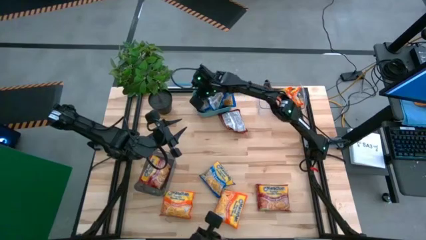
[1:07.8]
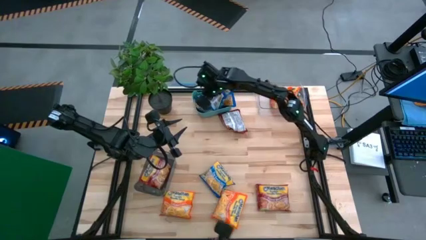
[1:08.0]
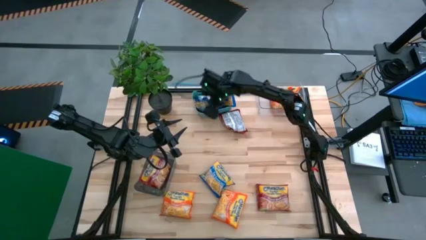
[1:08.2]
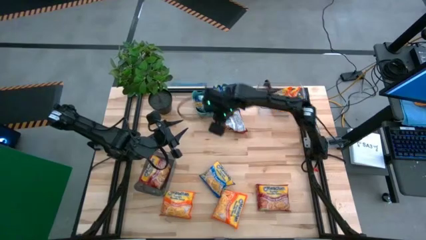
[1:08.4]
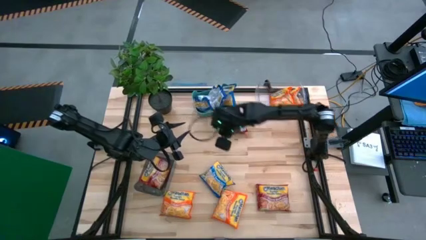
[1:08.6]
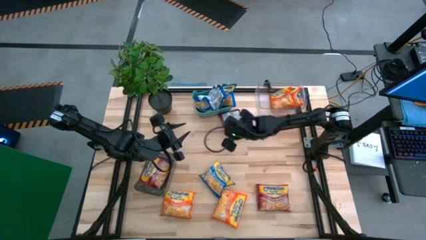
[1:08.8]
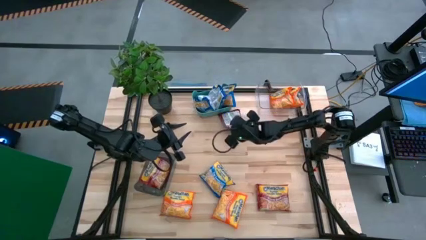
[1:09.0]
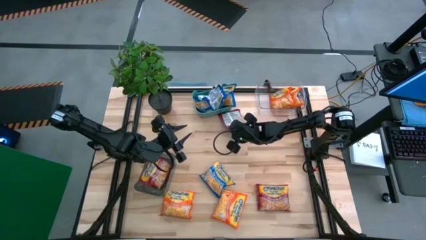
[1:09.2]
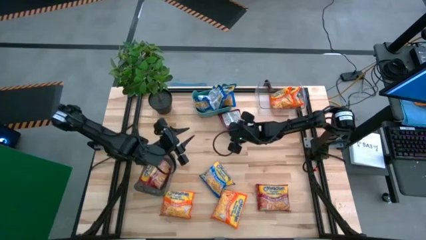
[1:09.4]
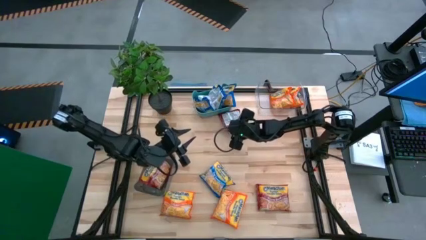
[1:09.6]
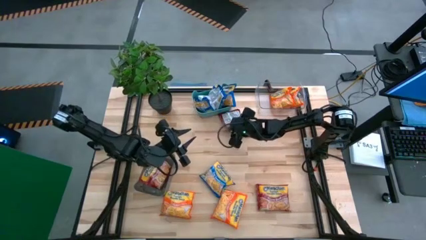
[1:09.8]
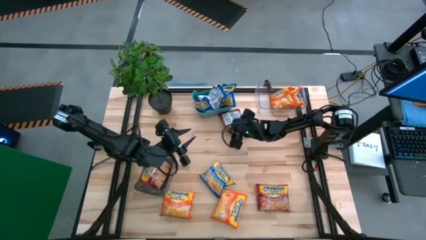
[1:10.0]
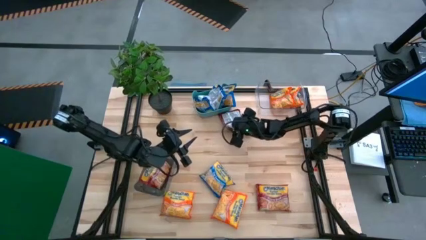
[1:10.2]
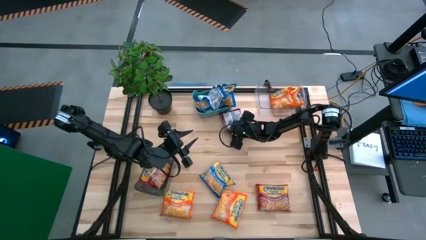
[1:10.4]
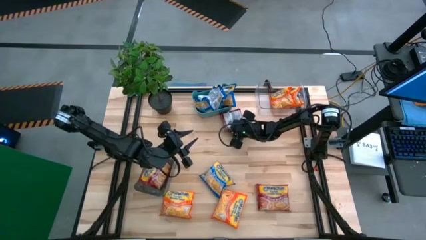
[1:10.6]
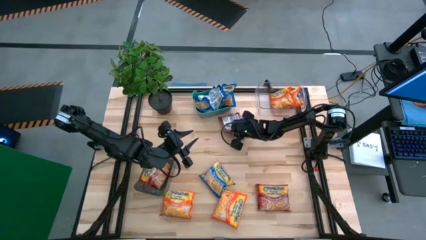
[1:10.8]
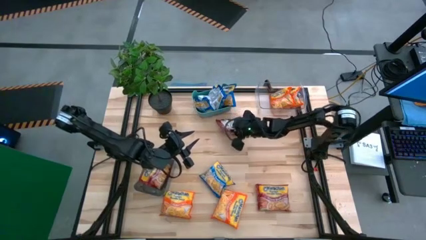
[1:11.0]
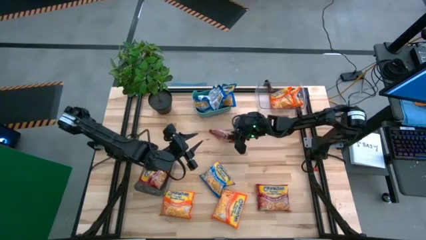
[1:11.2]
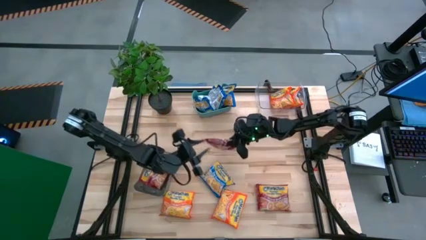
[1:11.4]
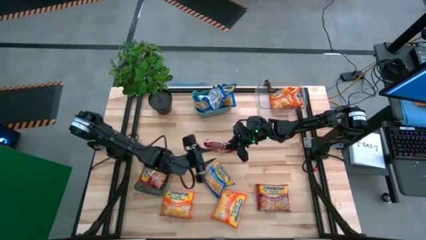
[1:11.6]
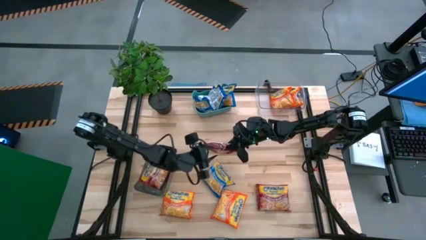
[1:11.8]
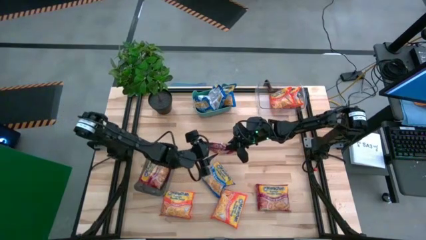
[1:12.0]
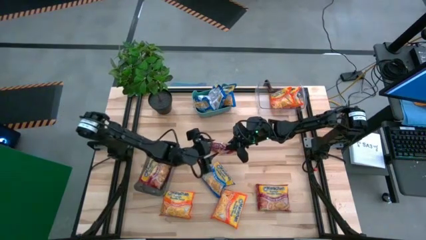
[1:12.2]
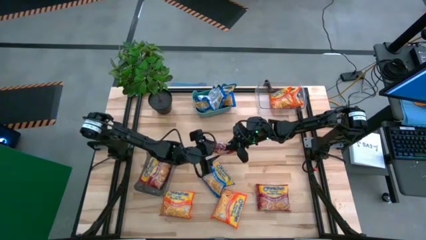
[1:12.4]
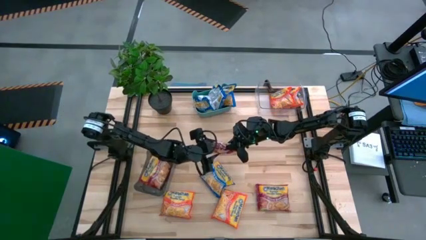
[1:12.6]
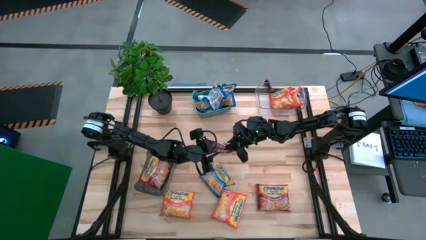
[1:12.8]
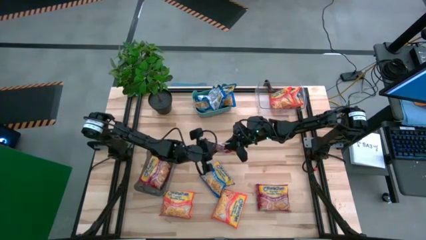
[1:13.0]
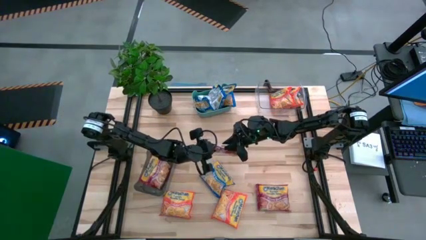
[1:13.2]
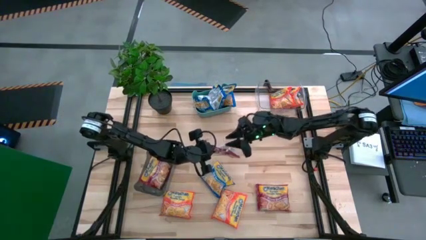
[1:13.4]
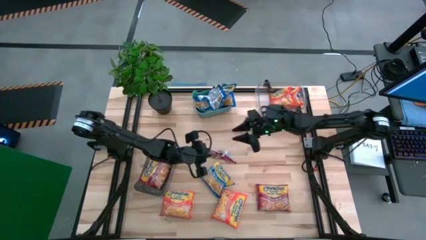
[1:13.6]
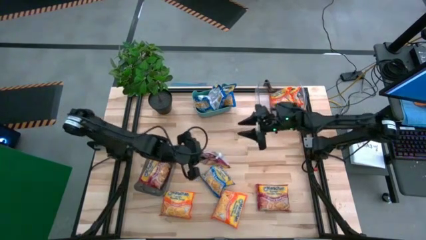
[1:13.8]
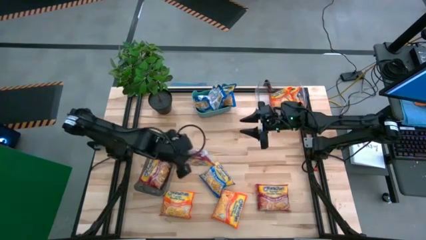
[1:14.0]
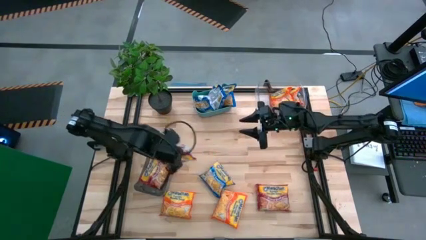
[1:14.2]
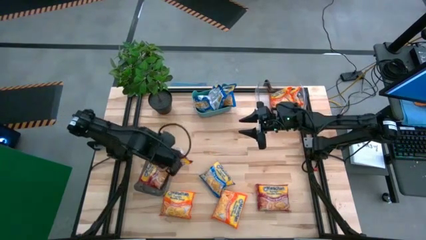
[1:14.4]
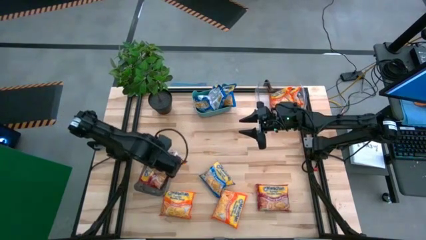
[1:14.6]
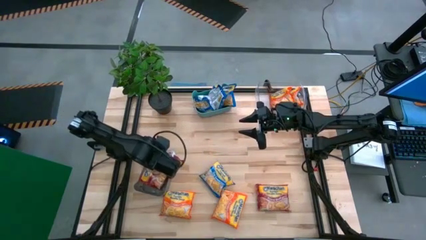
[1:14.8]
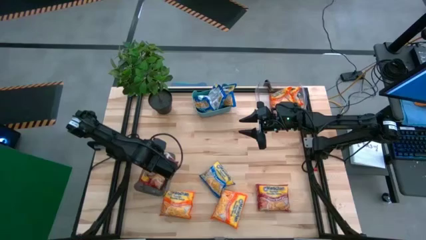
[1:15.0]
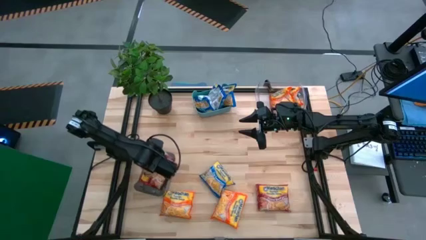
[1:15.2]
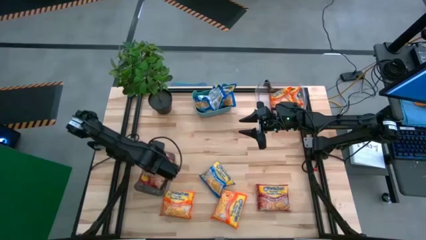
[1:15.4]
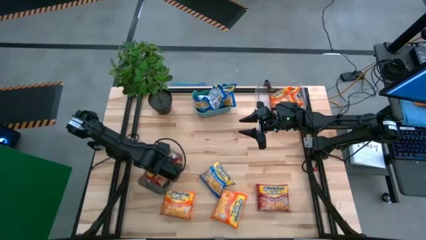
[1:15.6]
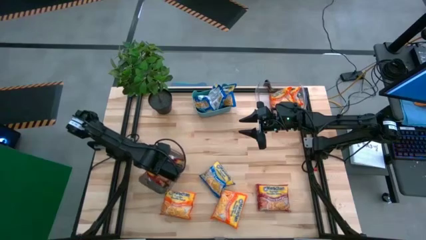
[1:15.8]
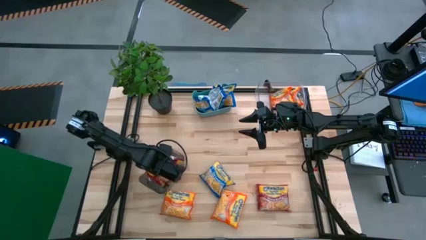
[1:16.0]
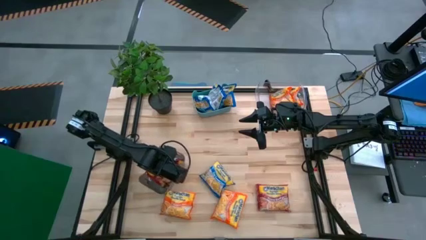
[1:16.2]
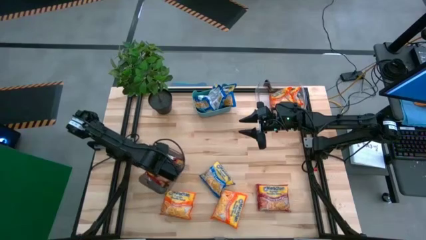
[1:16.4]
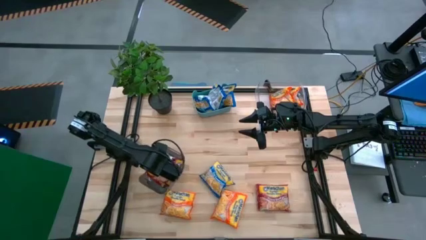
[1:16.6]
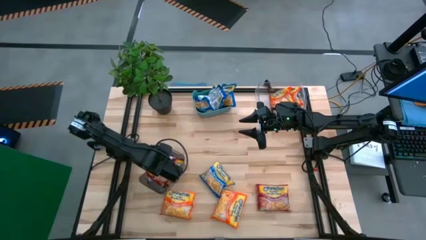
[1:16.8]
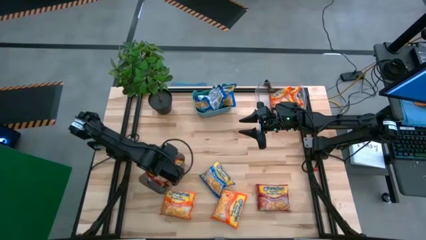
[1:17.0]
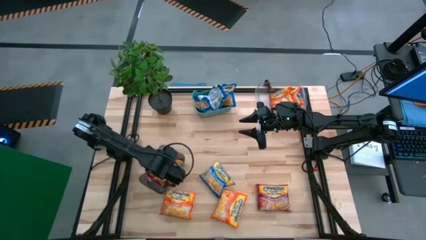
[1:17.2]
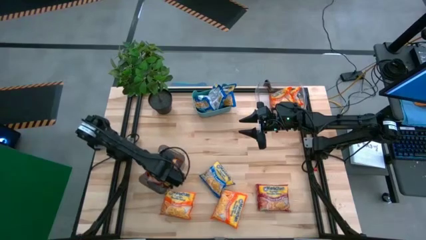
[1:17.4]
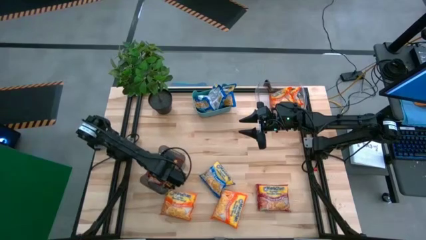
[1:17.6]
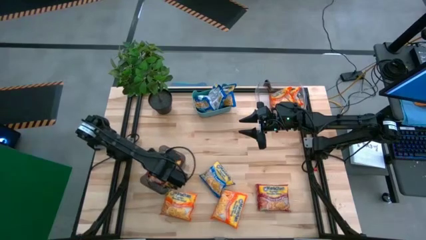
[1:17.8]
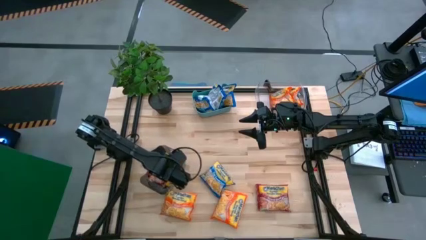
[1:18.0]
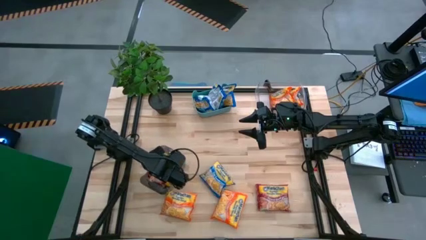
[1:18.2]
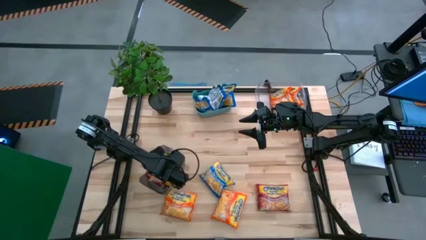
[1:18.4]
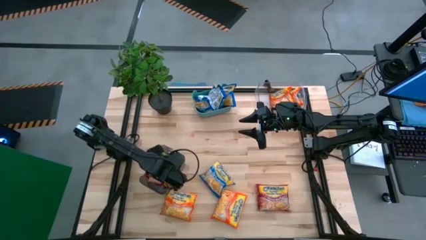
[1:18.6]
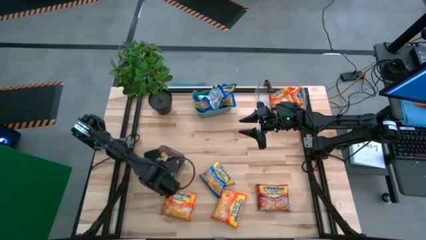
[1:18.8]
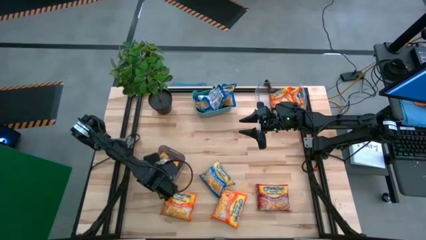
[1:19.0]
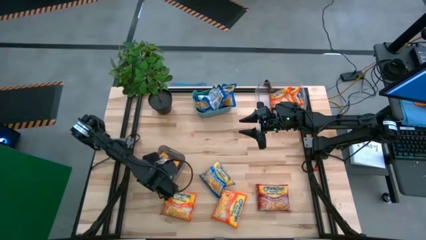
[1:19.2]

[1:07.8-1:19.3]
Task: Sort Maruchan noodles
Put the top red noodle pack into the black bin

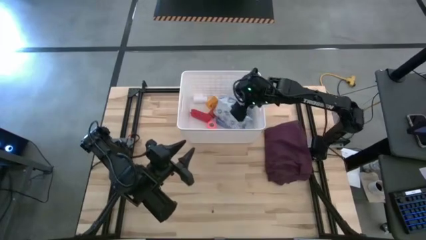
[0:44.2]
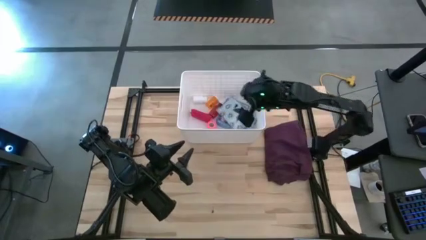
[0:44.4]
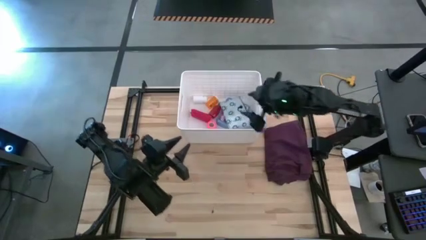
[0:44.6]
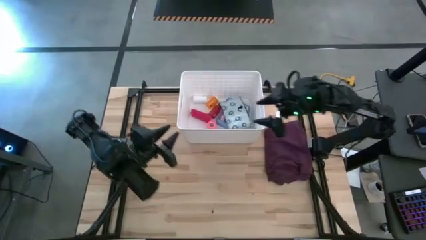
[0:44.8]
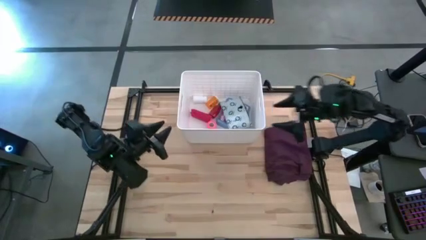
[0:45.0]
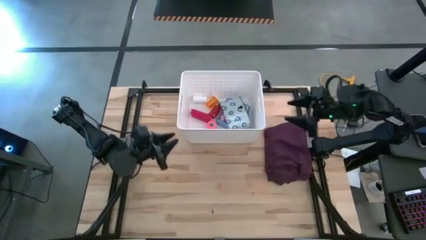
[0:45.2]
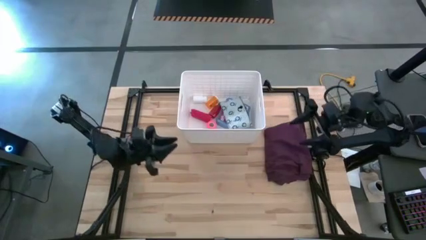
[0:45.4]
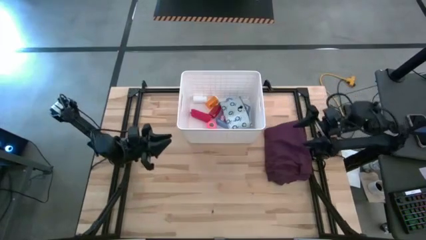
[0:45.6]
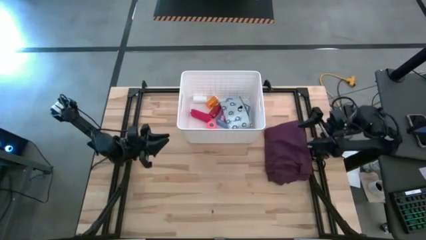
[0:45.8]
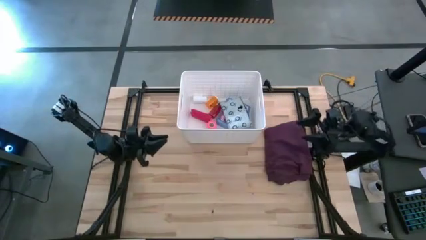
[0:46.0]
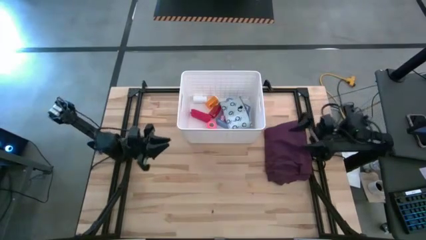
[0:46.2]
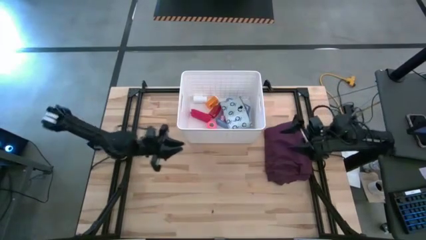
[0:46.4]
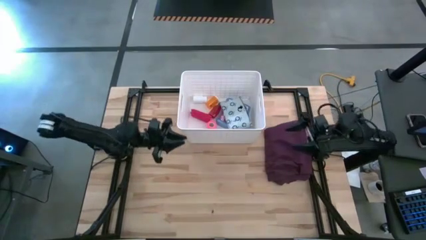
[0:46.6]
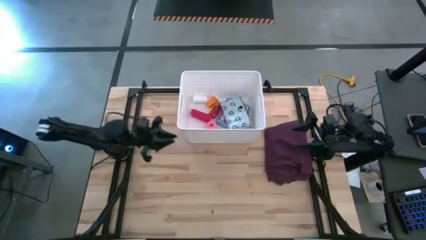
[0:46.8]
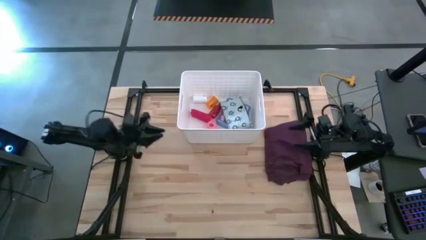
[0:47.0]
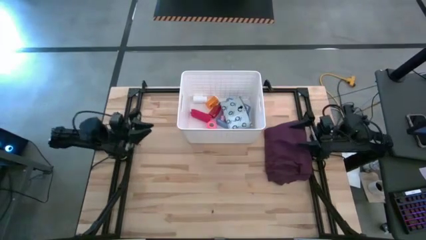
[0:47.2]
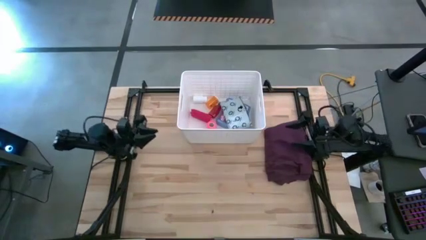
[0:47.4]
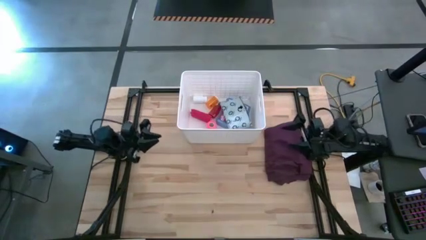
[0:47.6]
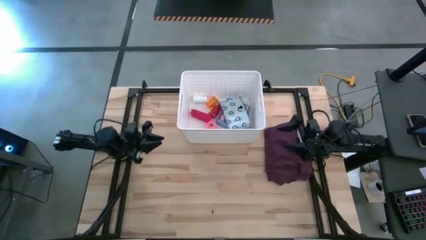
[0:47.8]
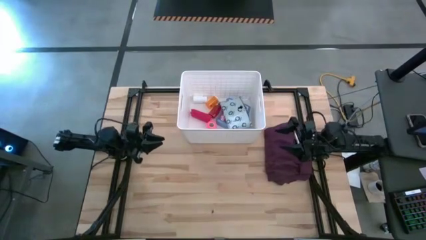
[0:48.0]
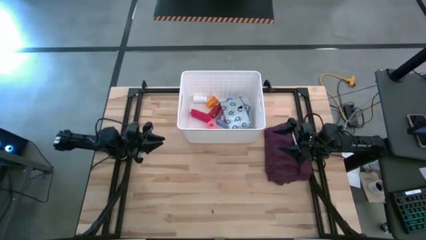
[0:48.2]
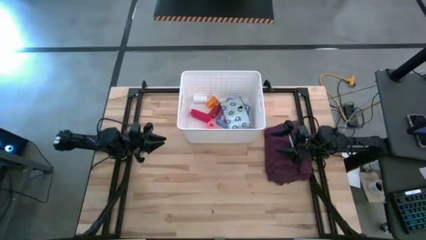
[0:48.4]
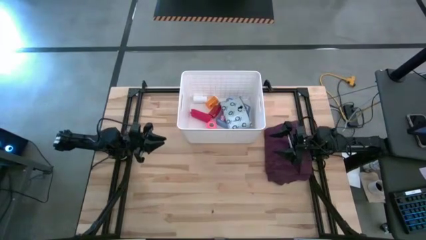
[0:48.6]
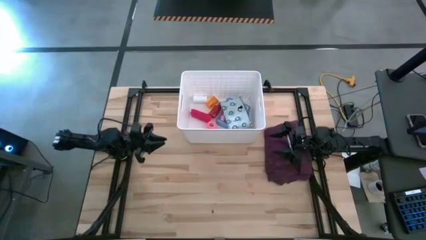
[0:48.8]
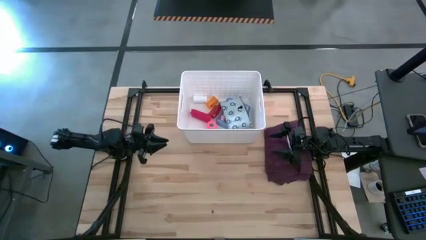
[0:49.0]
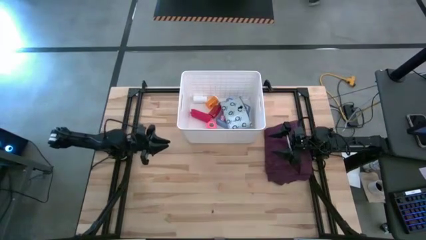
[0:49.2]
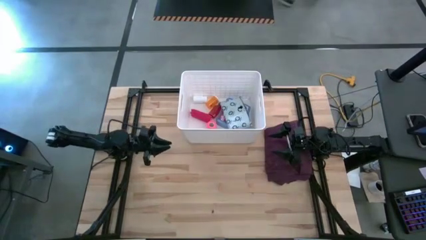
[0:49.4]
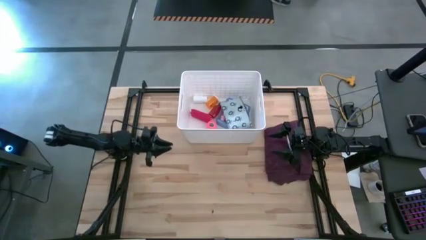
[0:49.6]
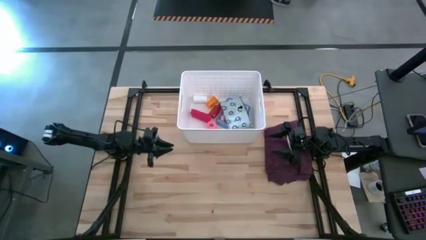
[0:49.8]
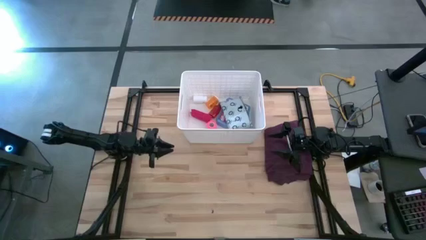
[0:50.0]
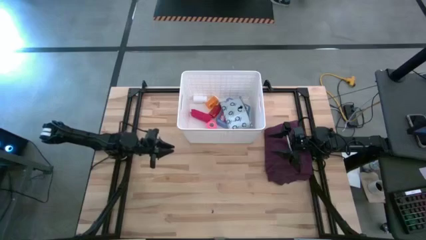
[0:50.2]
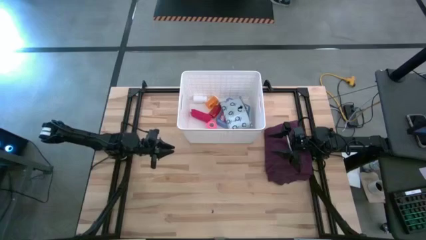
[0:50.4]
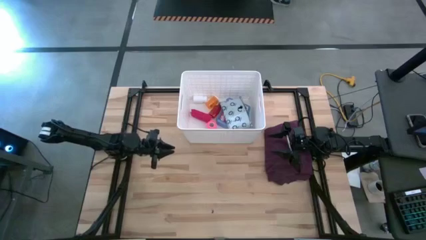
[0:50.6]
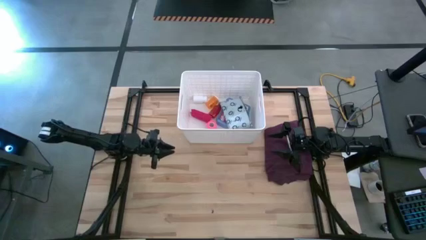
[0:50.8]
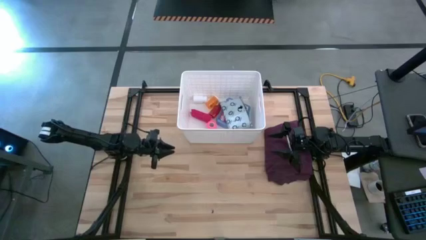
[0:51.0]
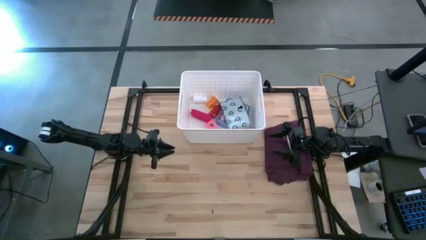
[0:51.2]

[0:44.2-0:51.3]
Task: Pick & place medical supplies in basket/bin
Return to Home Position
